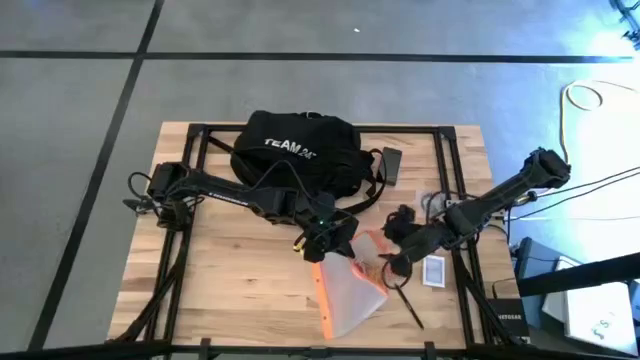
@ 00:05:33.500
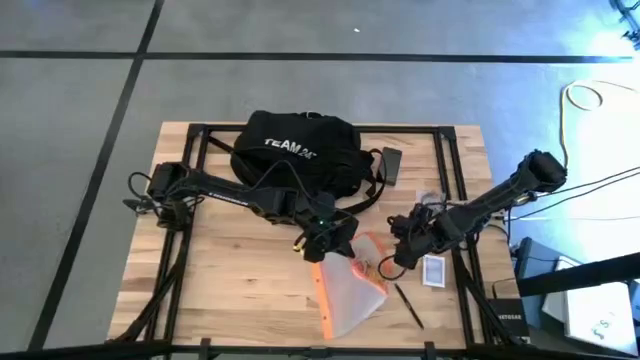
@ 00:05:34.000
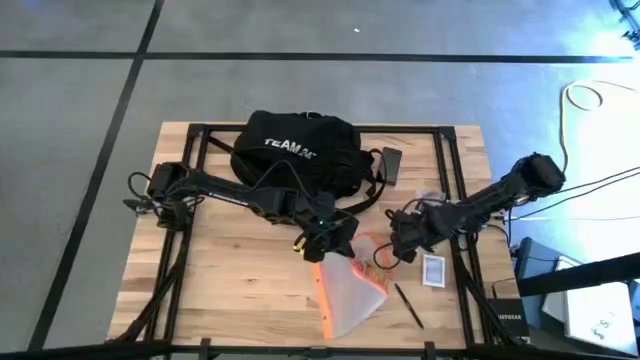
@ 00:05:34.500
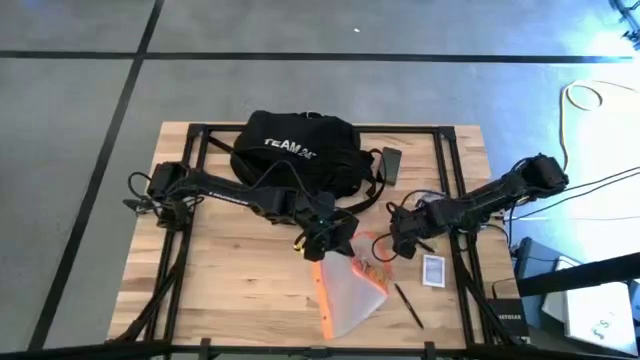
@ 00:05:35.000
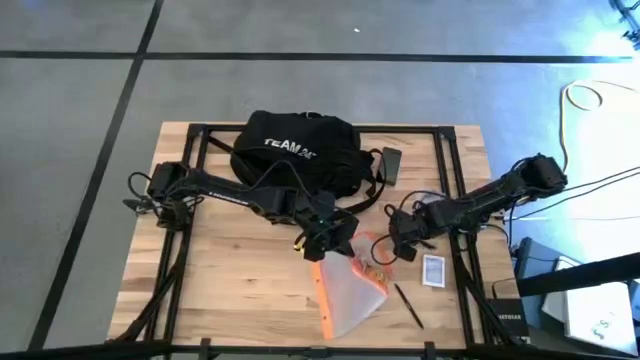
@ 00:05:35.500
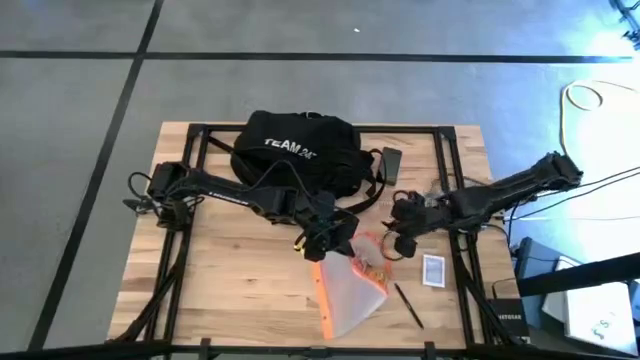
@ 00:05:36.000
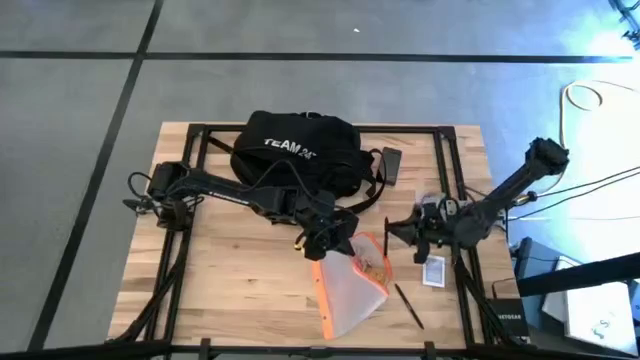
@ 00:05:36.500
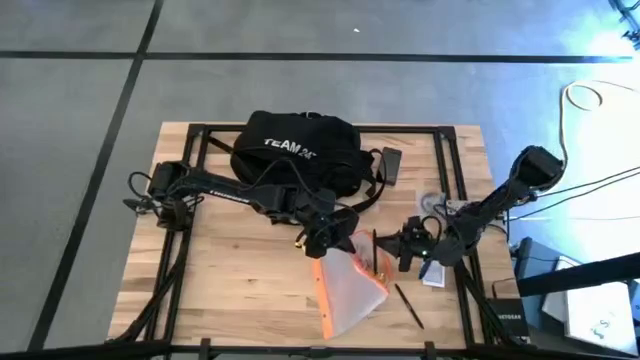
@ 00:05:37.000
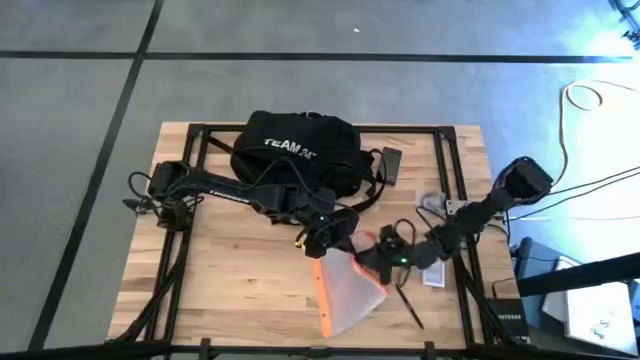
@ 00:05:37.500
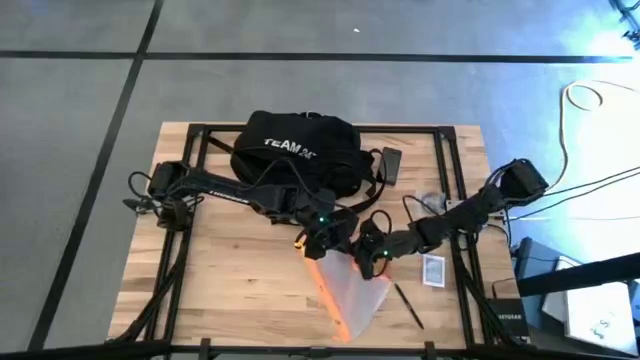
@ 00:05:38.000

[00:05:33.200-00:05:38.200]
Task: Unpack backpack
Put the top black pen into the white zip bag

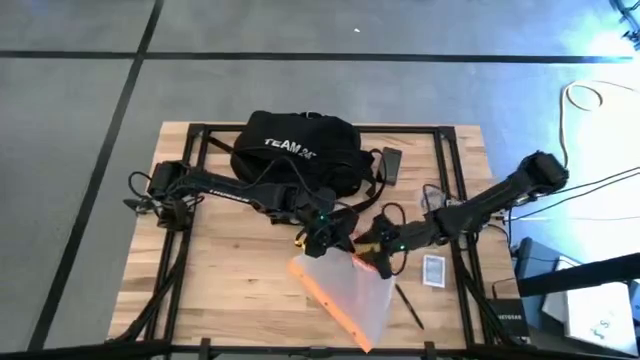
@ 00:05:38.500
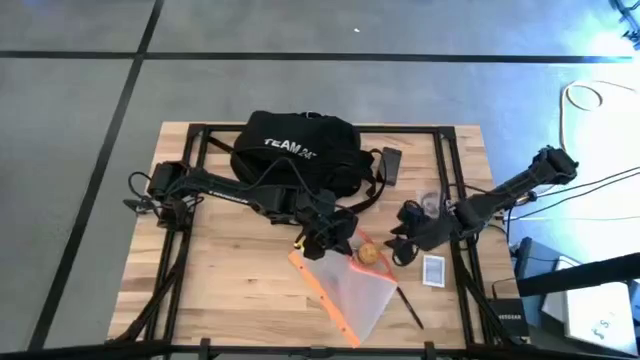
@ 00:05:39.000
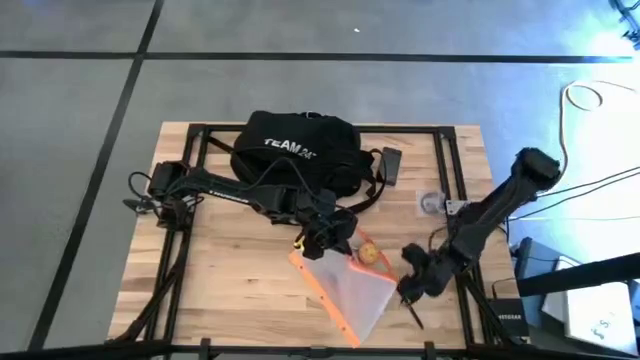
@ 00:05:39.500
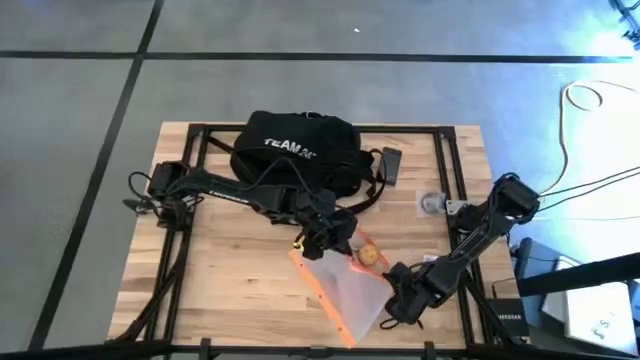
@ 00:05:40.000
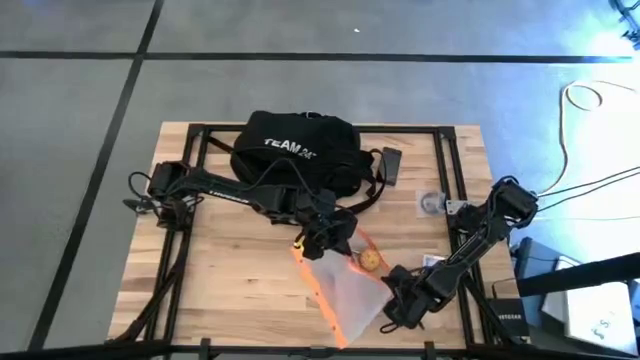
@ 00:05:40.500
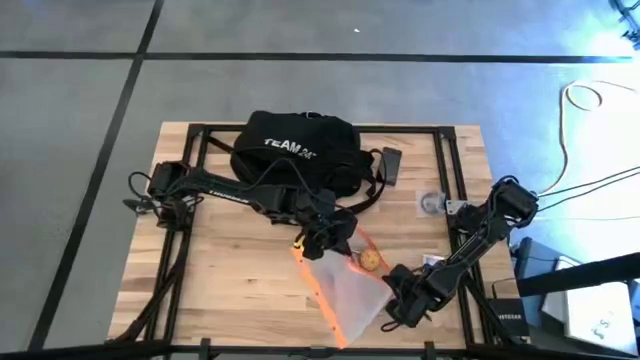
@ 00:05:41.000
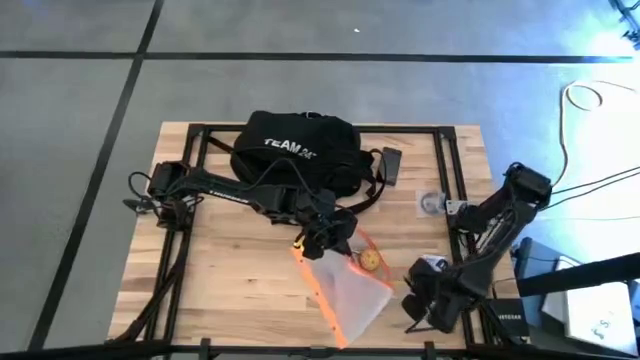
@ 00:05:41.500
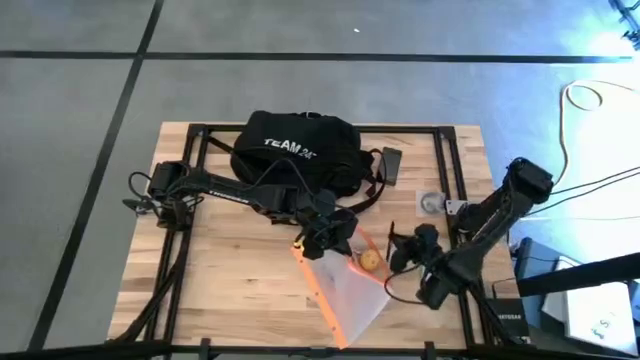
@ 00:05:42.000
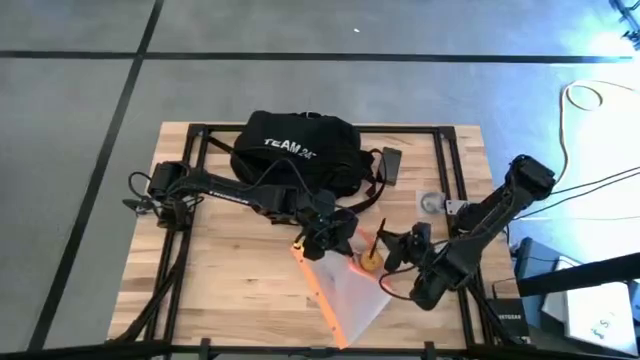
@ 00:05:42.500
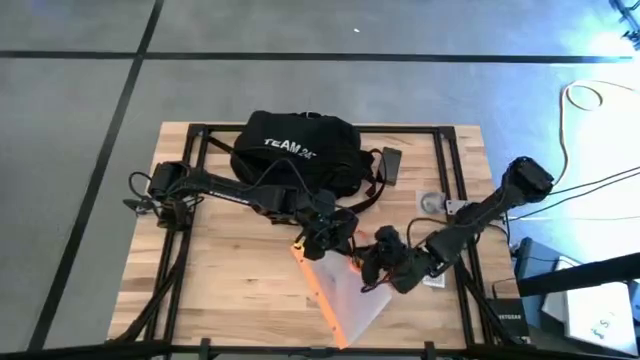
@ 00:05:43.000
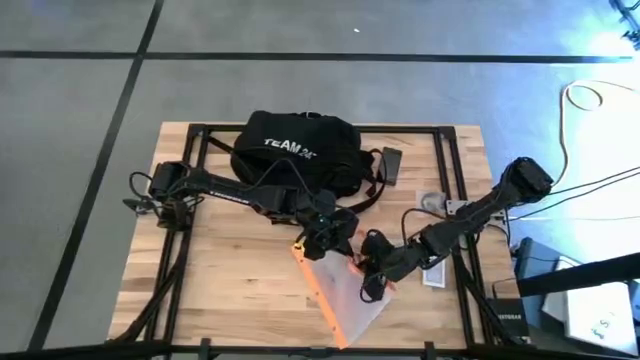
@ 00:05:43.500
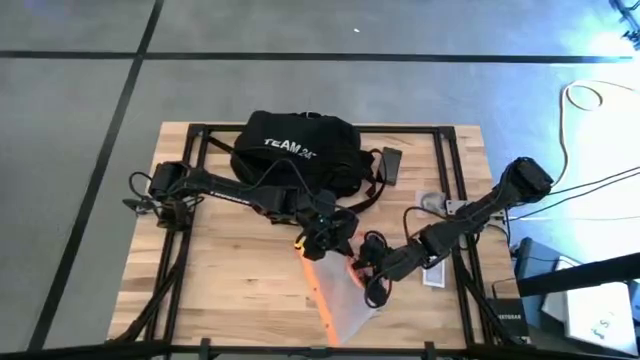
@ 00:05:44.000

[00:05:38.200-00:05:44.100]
Put the black pen into the white zip bag

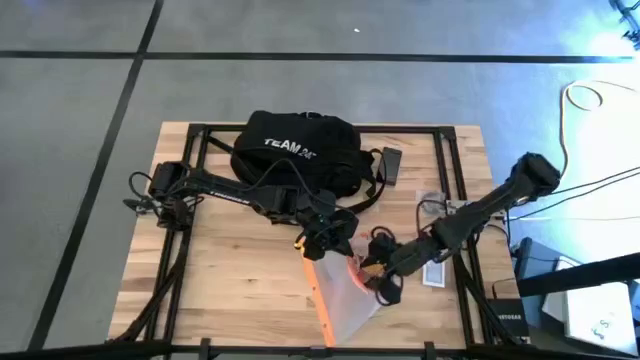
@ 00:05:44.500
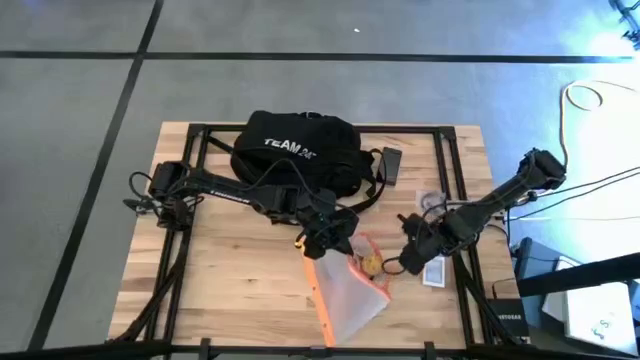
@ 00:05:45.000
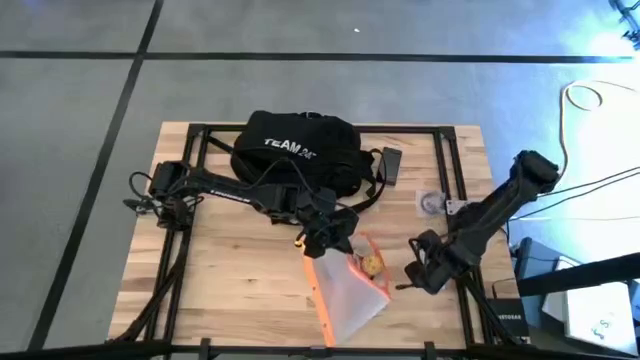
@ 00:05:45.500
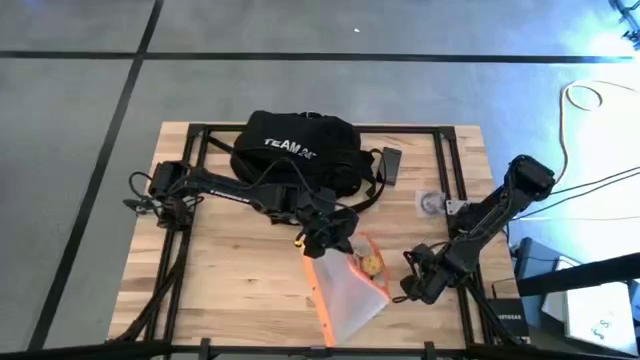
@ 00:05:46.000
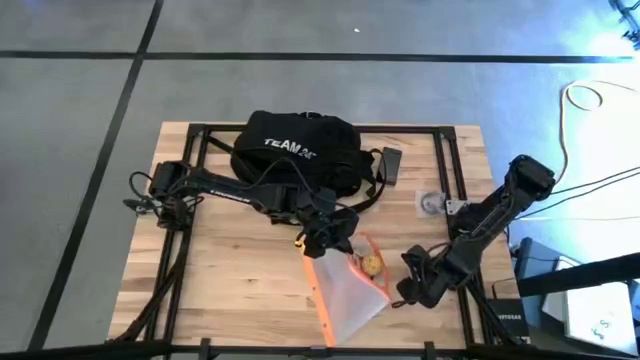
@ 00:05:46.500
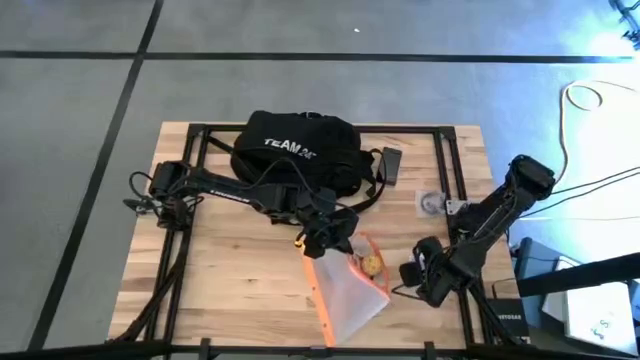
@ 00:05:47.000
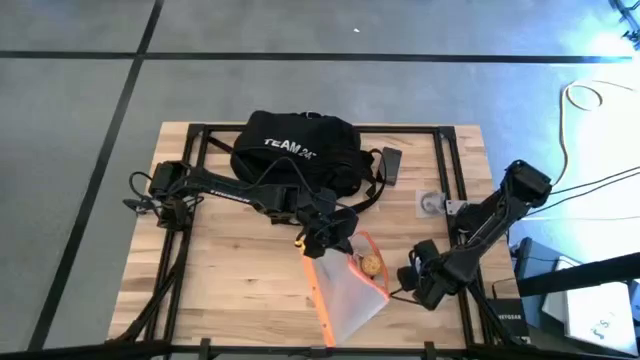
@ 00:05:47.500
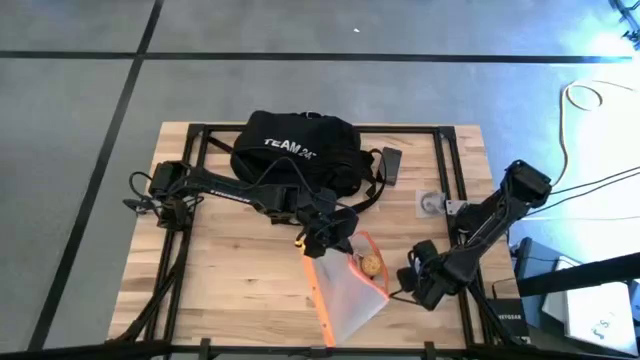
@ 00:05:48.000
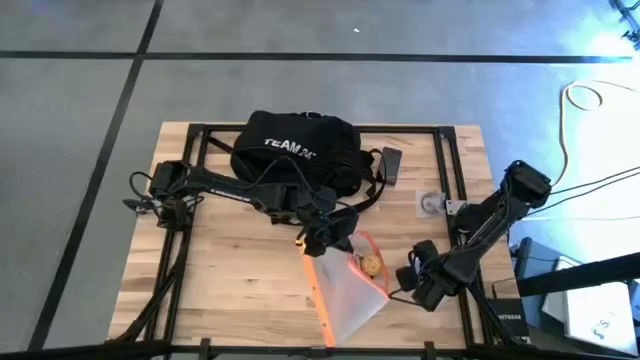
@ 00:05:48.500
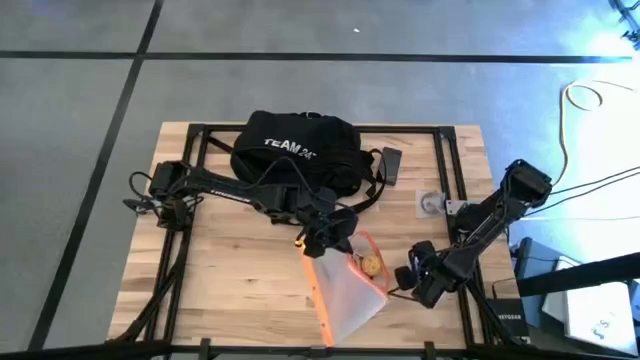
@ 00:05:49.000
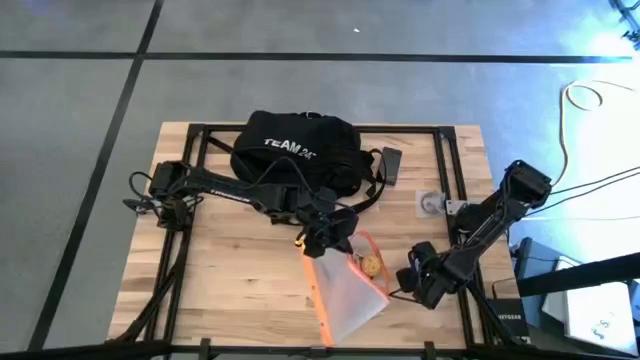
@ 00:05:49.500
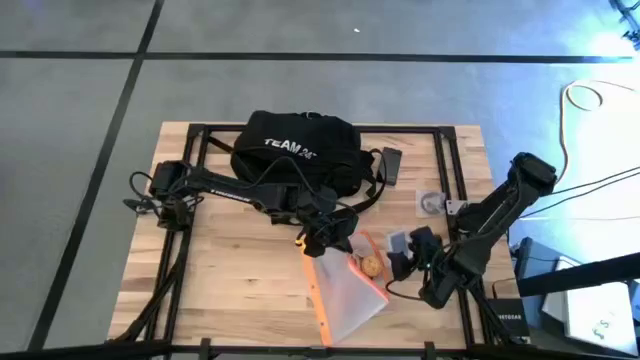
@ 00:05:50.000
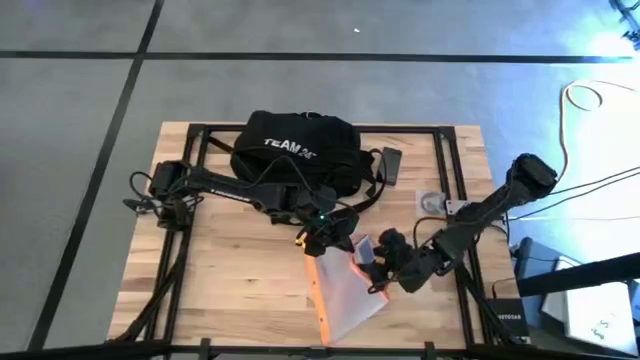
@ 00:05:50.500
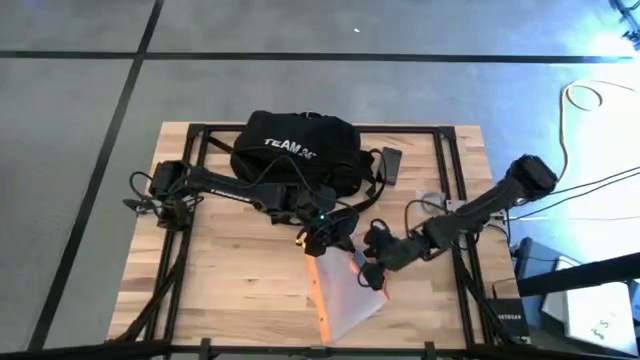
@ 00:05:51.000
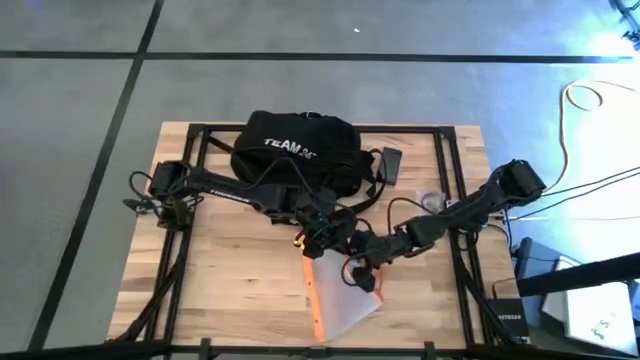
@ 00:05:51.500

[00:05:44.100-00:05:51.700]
Put the game card into the white zip bag

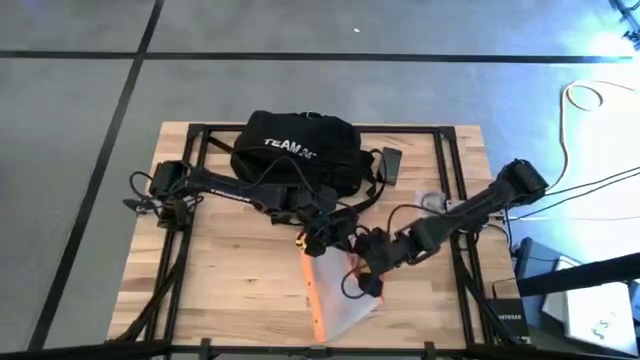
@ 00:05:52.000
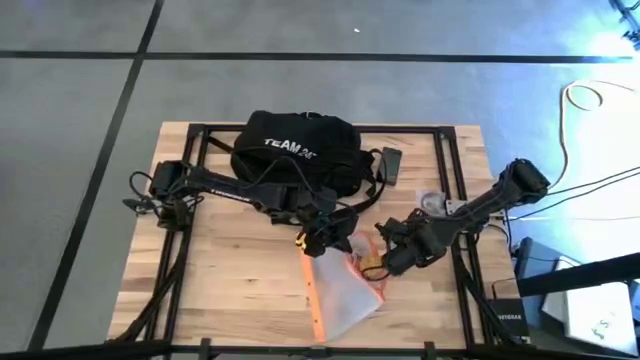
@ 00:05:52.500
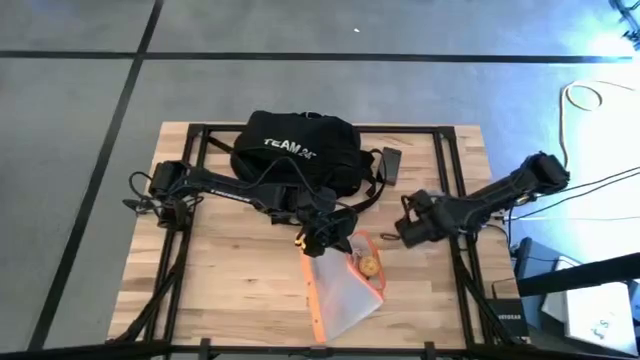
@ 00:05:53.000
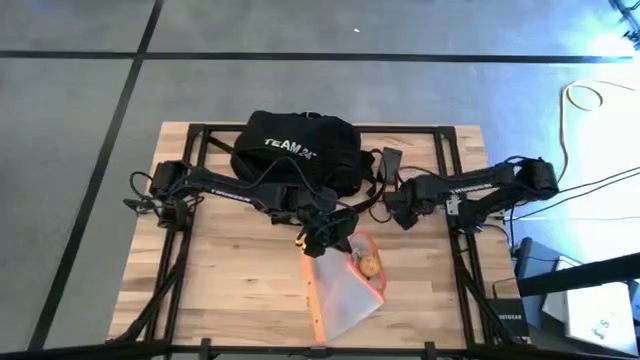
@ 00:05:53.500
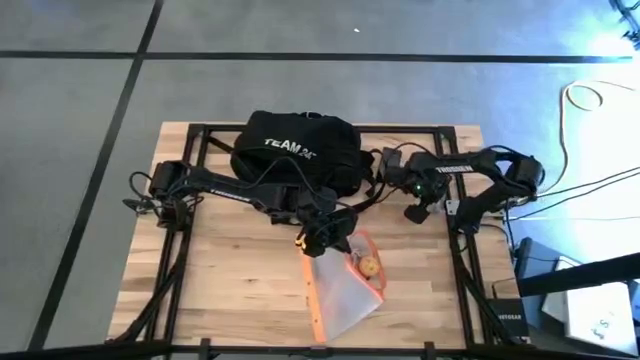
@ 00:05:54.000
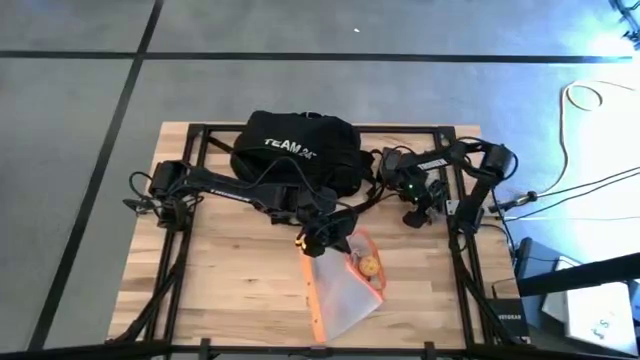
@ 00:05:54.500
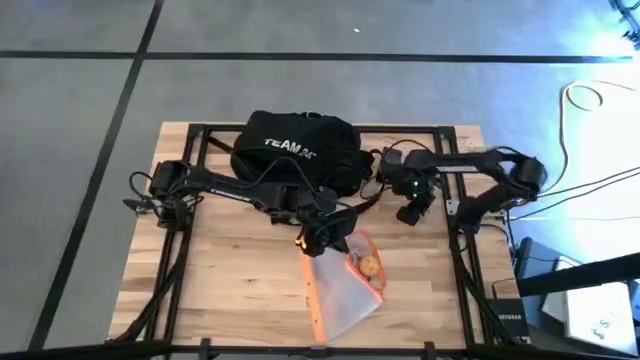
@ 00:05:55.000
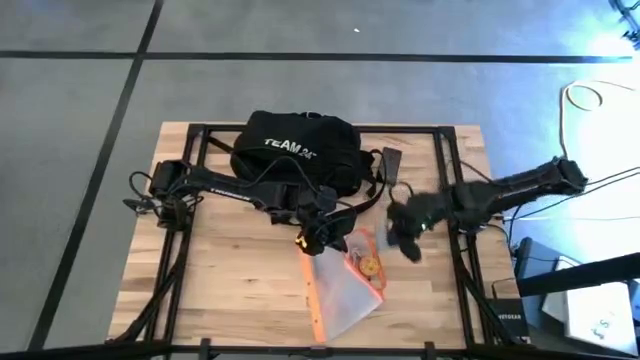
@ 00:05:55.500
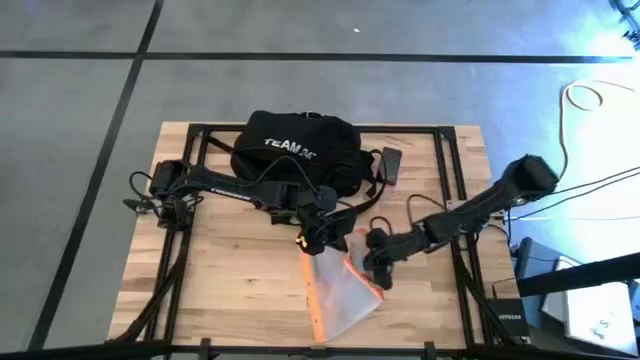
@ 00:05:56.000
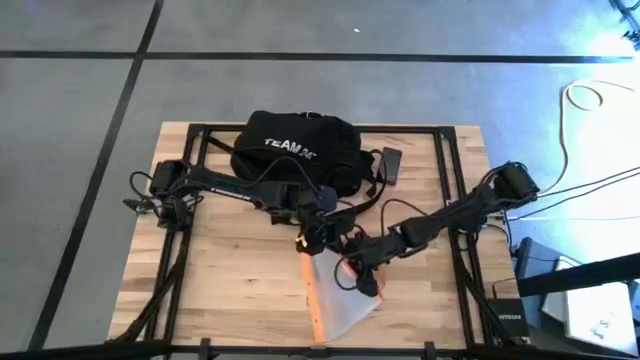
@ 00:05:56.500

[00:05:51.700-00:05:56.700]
Put the black earphone into the white zip bag
